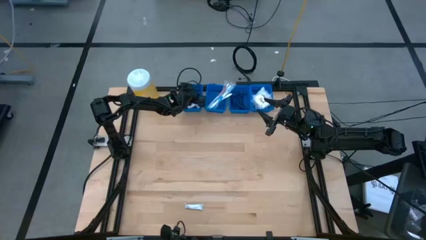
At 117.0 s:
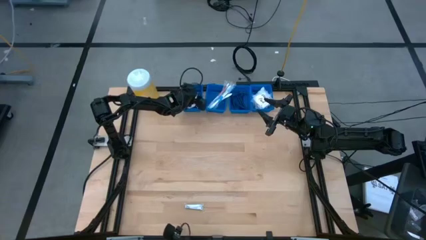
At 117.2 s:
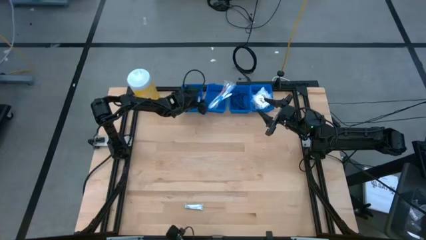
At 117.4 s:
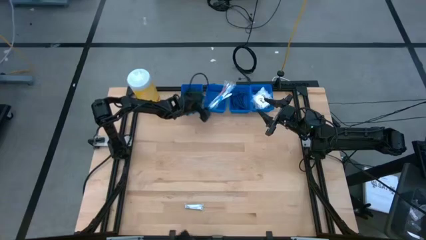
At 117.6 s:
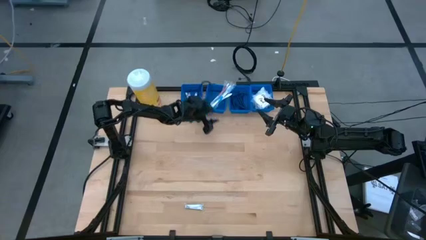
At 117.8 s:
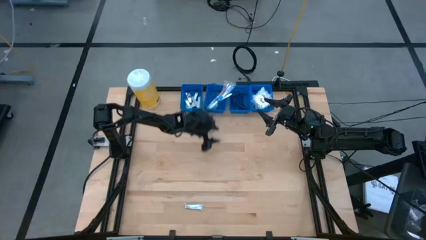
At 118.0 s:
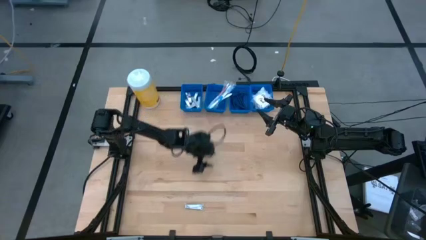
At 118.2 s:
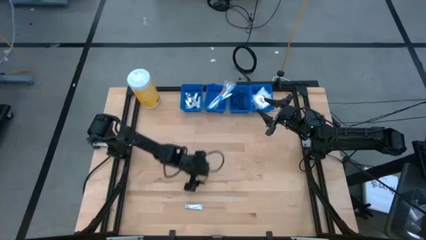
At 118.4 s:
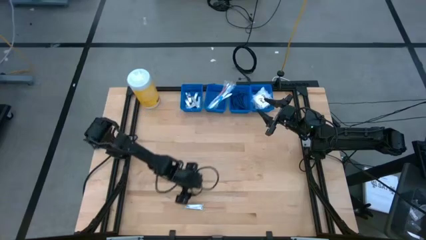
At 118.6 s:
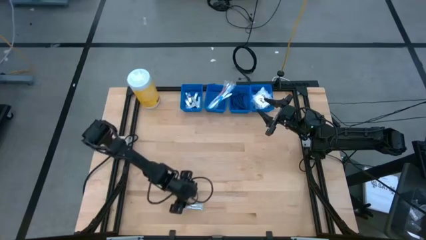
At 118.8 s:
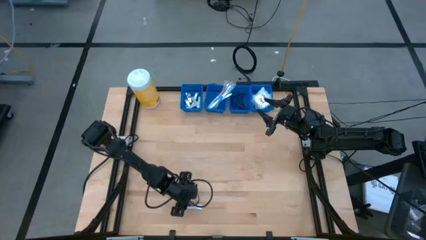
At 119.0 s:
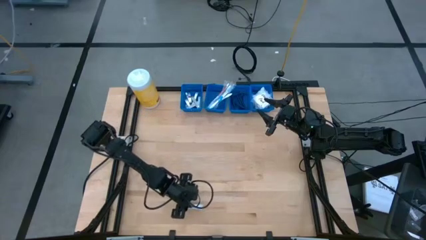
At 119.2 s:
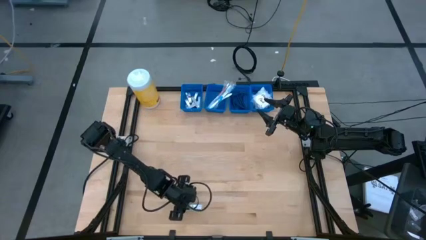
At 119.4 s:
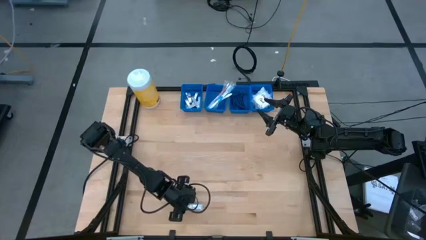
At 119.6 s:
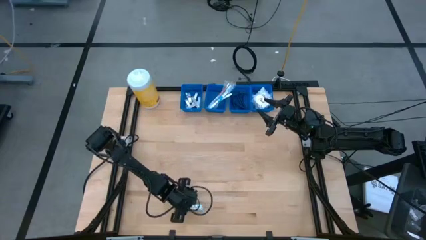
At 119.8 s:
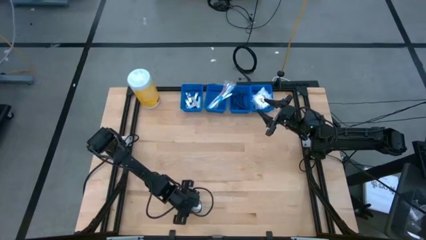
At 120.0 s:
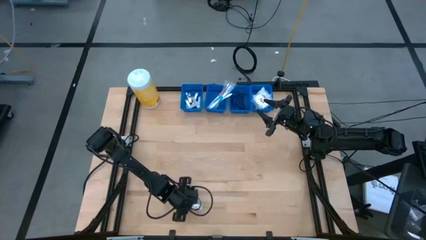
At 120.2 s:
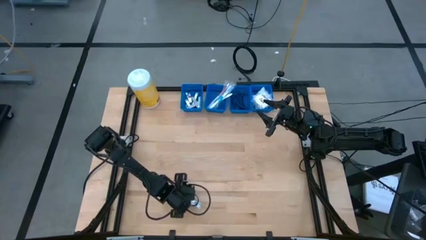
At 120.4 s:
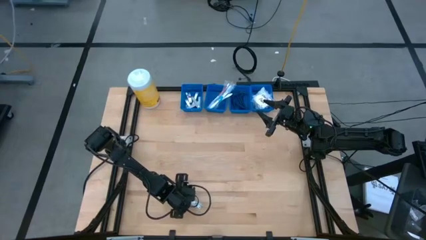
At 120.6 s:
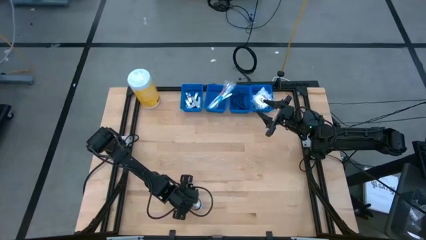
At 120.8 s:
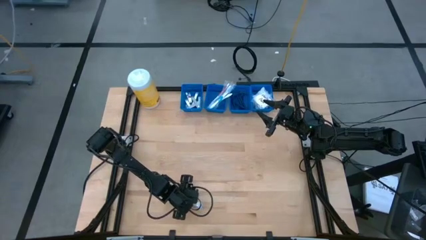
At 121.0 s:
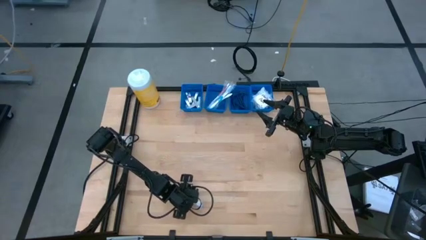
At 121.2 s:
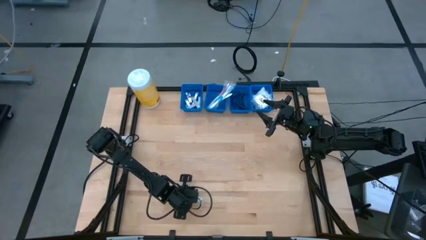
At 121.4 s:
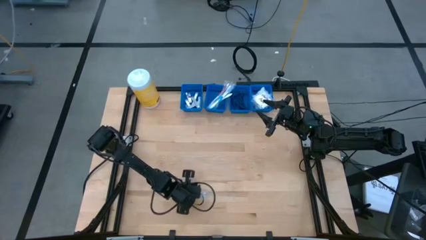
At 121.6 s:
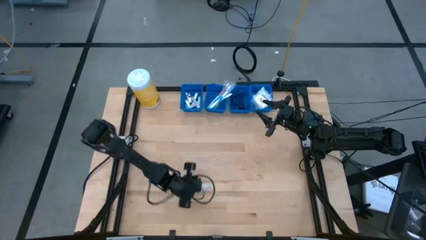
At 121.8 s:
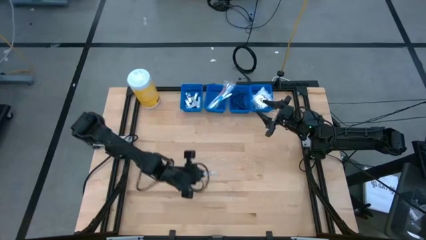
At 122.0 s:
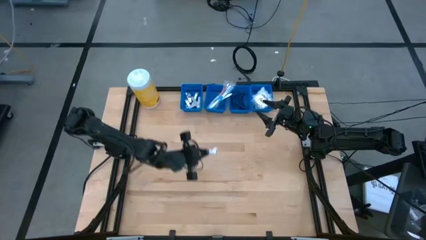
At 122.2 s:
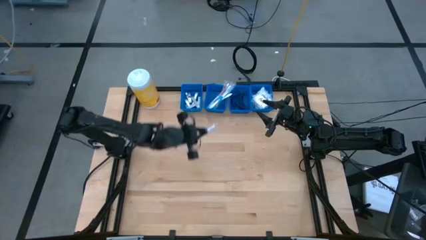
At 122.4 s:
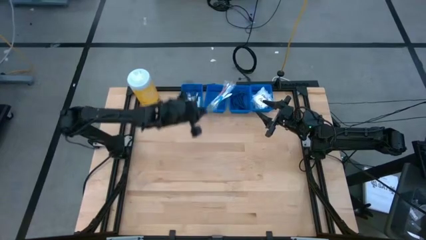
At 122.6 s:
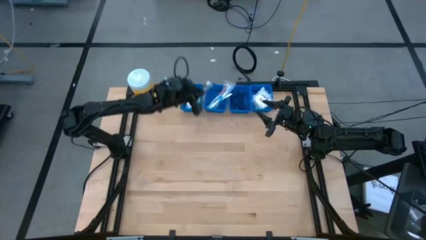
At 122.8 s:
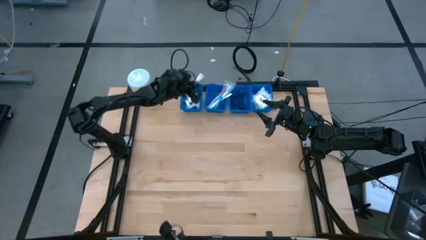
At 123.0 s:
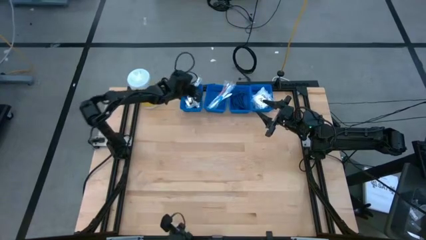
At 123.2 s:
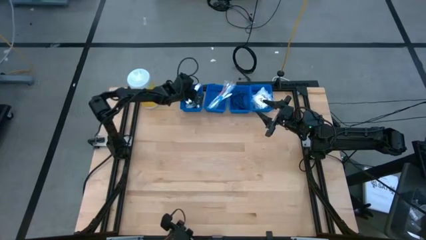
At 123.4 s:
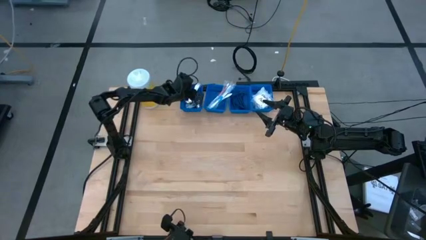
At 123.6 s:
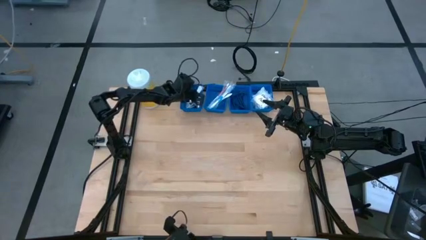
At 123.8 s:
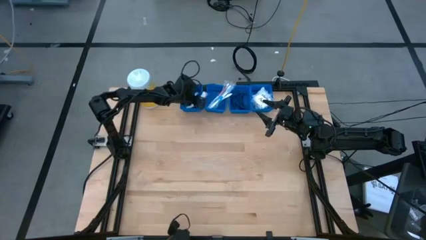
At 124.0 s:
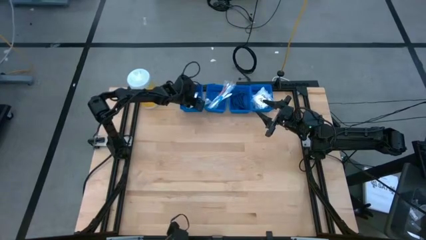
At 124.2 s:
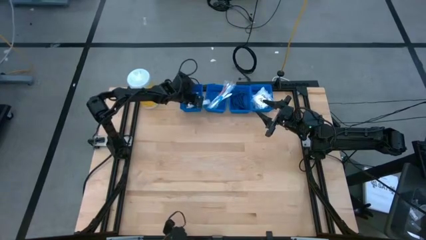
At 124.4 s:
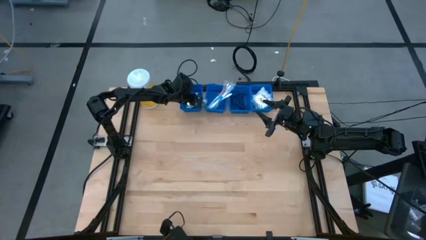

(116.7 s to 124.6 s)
Task: Pick & Place Travel size toiletries
Put the silver nail cutter into the left blue basket

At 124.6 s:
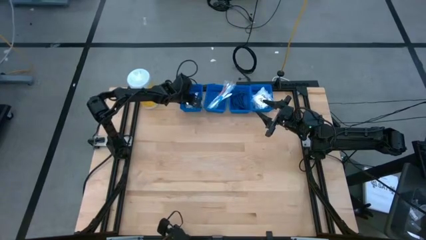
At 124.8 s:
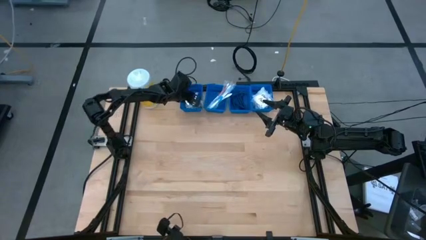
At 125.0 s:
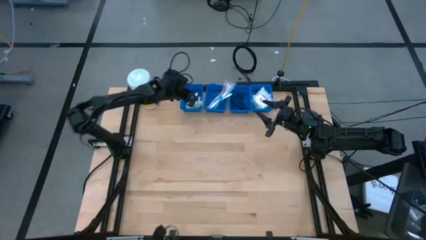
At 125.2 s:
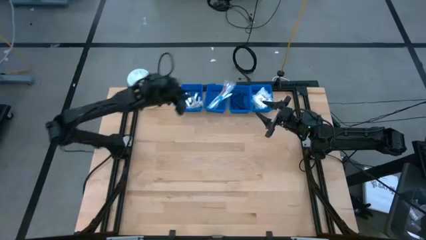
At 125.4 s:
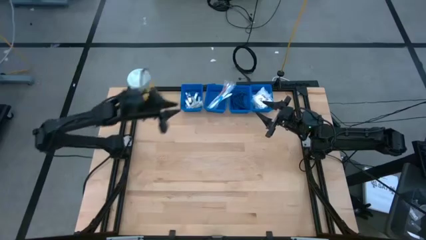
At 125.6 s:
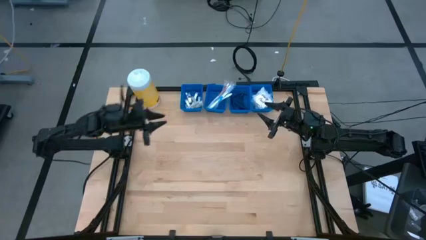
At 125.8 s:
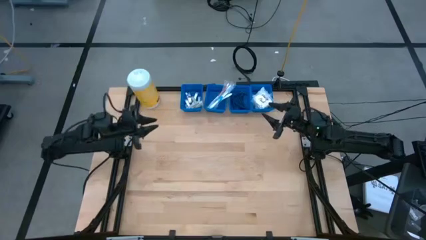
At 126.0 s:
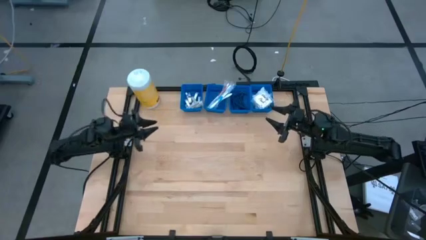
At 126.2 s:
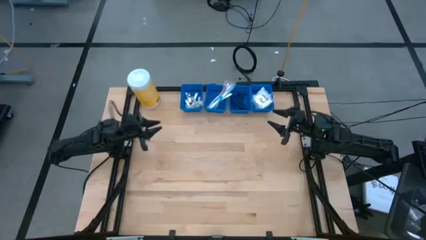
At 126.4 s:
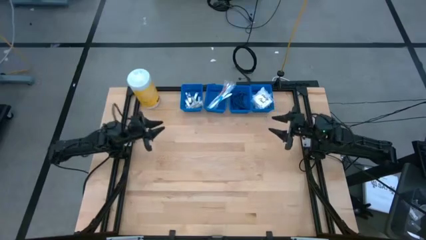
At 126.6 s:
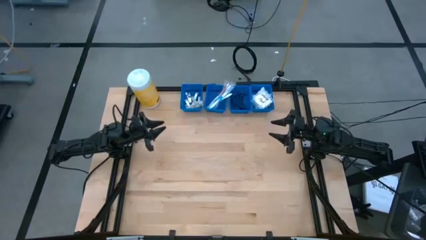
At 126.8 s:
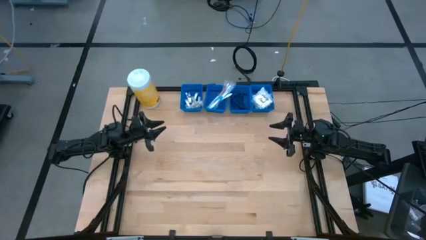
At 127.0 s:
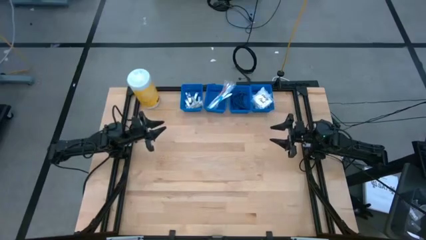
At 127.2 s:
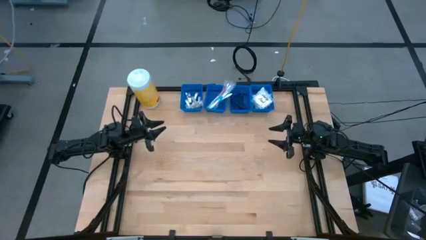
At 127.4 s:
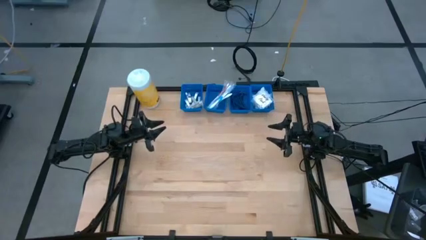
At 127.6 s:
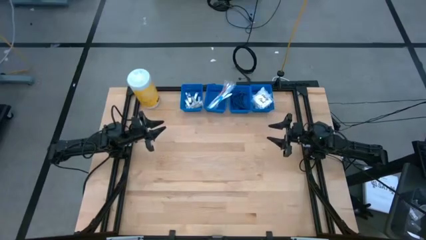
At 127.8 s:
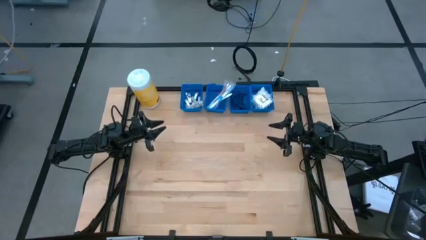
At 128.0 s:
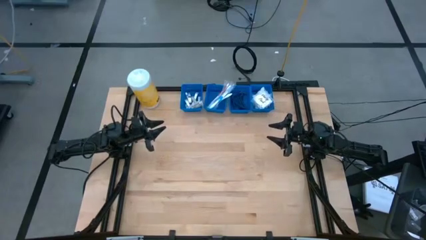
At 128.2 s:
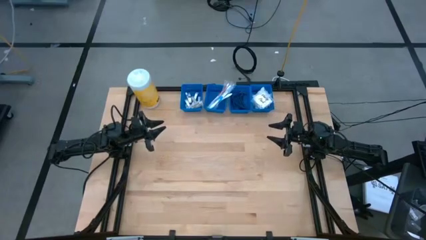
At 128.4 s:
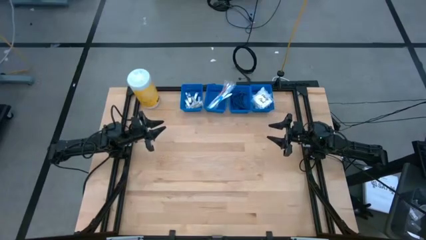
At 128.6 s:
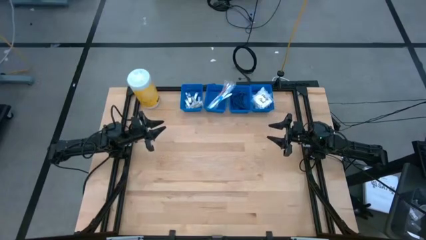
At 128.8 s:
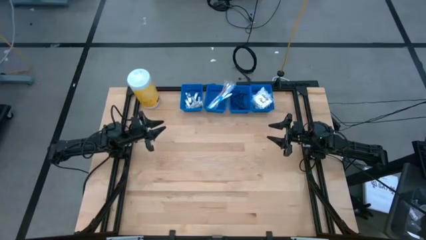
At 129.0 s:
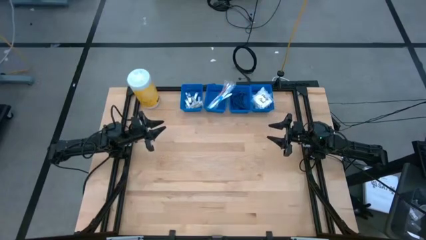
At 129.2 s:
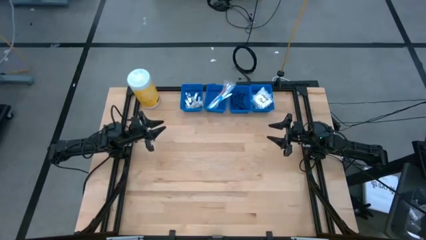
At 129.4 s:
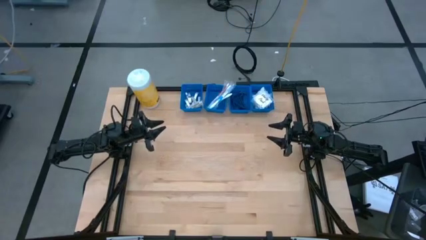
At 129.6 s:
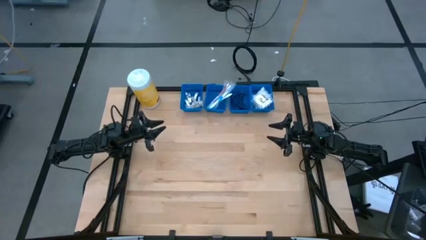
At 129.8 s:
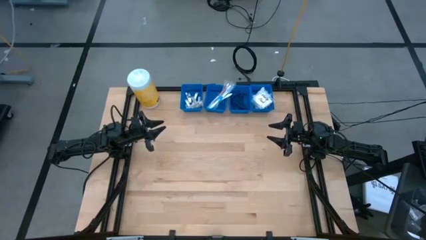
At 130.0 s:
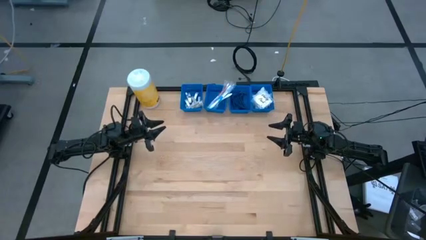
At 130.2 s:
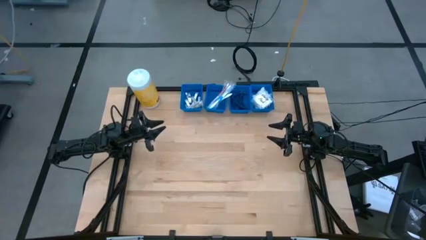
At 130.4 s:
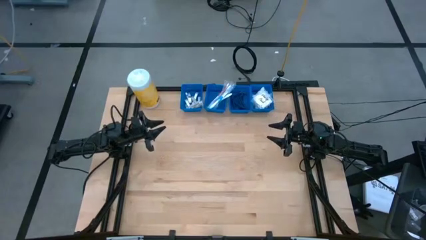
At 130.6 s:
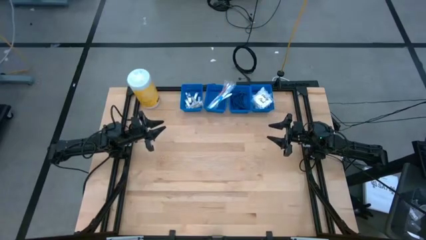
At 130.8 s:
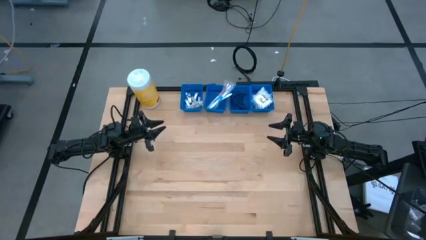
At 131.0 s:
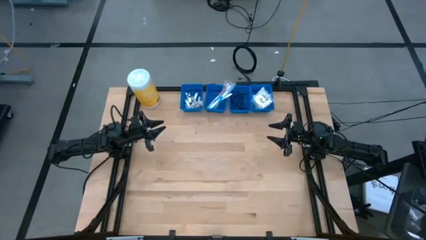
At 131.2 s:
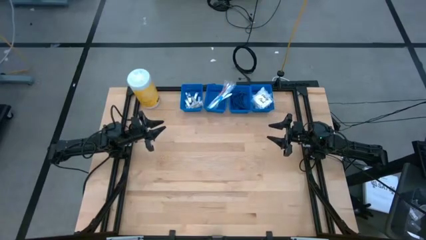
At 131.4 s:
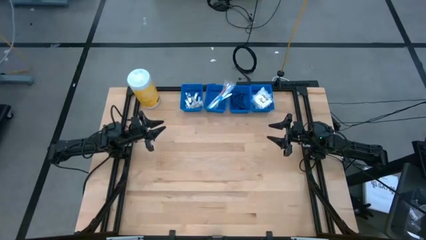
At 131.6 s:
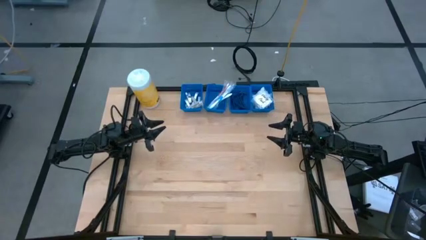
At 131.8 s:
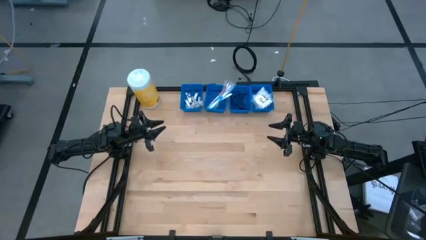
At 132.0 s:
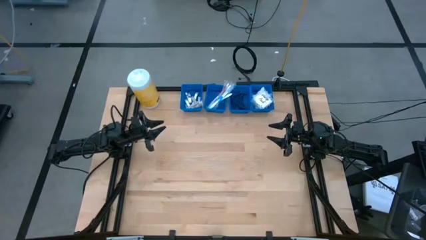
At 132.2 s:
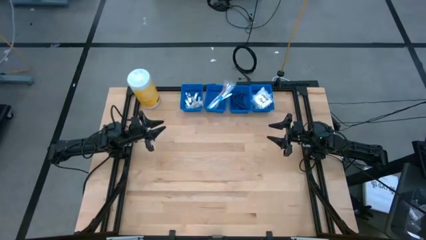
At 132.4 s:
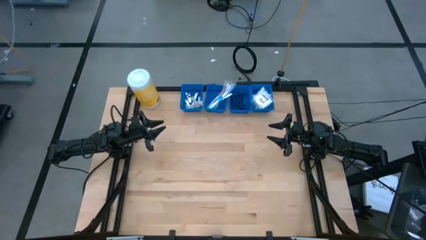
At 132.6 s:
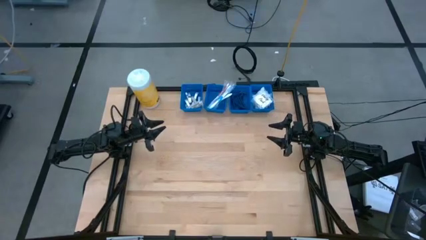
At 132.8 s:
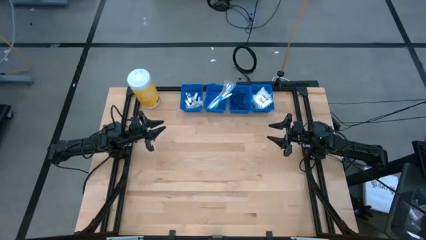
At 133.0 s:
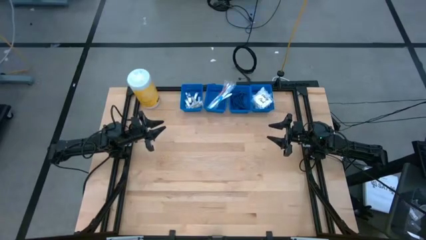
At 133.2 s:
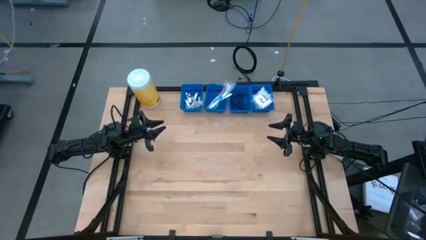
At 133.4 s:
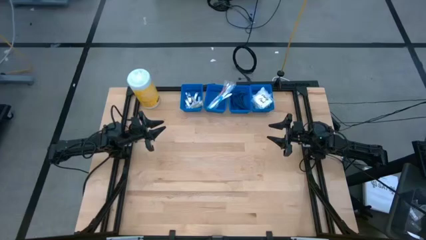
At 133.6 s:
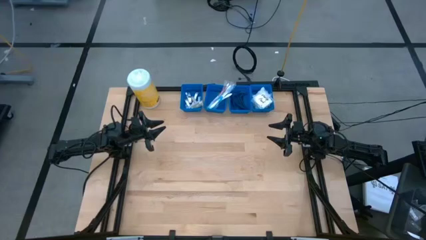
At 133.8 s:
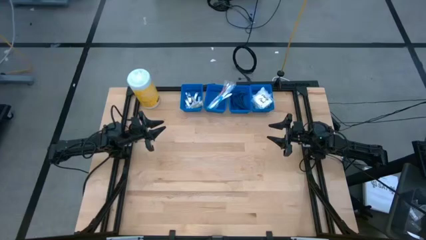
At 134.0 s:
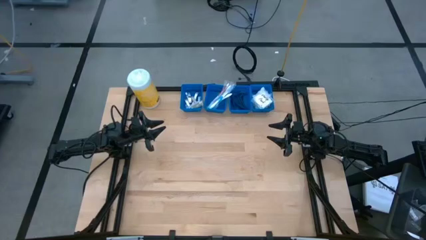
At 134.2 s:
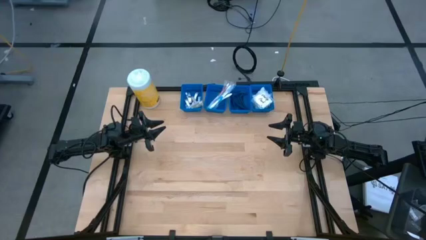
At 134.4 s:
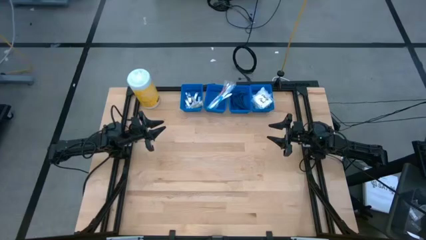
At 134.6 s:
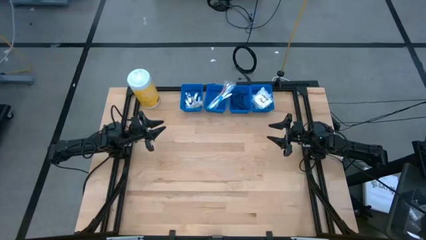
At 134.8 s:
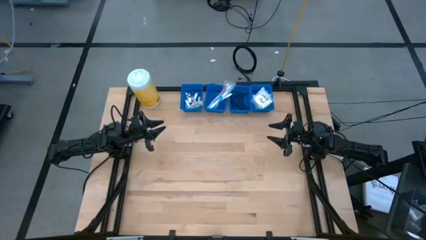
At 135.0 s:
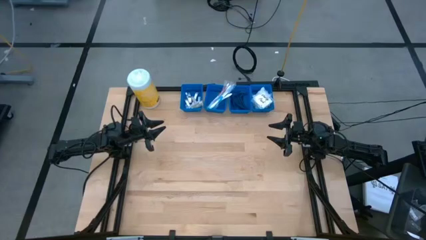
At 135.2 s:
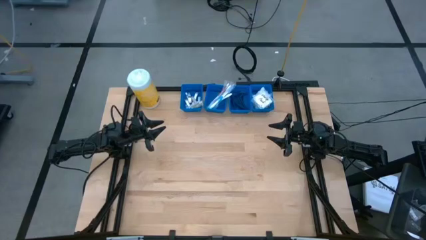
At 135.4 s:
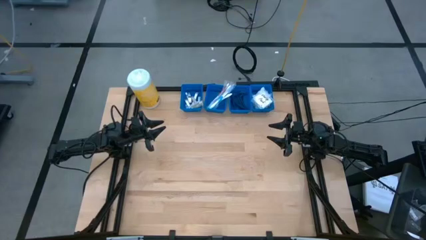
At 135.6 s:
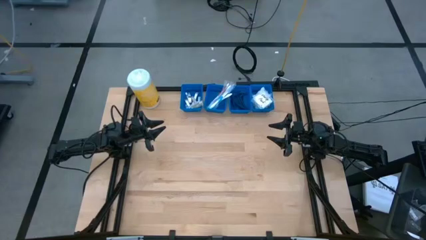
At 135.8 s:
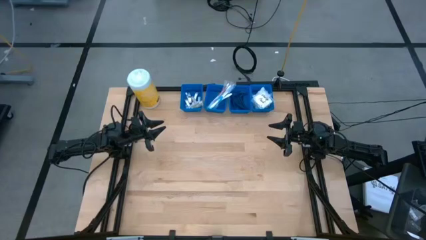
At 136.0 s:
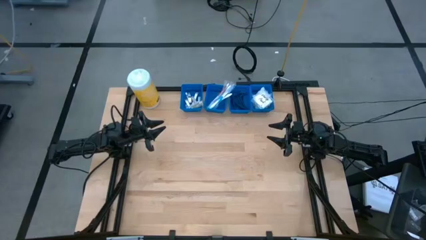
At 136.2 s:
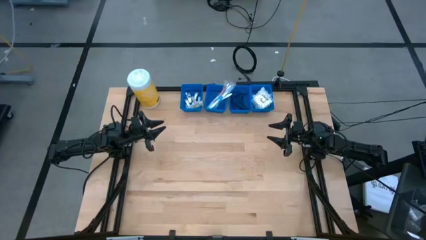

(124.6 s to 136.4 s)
Return to Home Position
